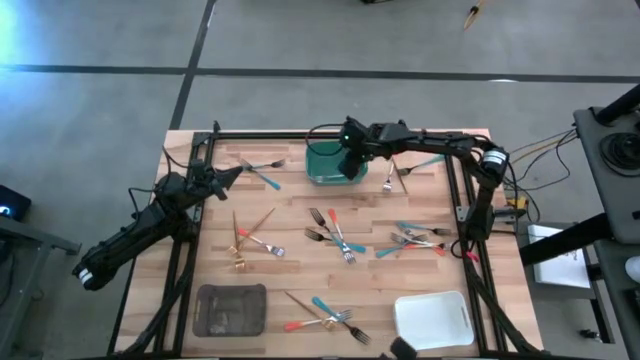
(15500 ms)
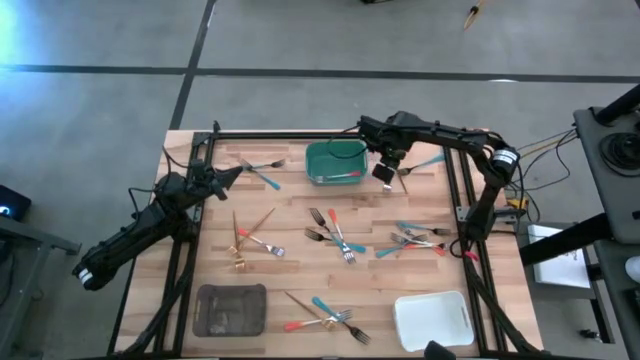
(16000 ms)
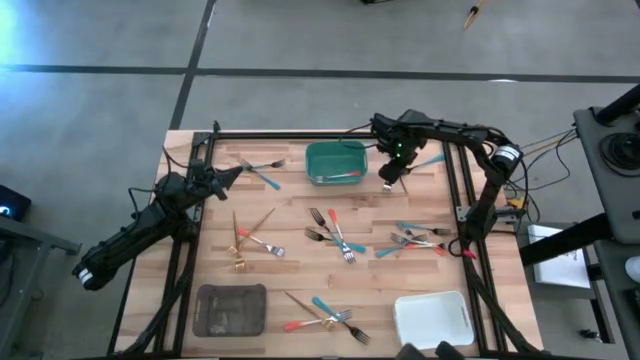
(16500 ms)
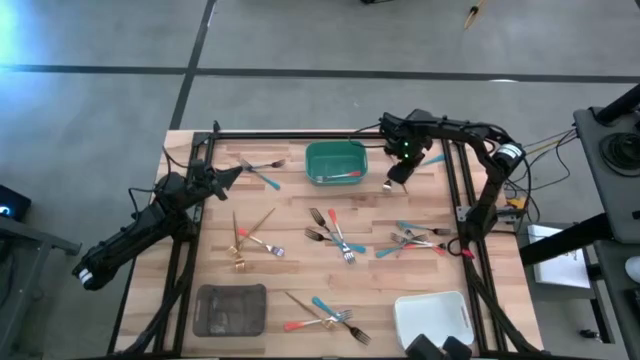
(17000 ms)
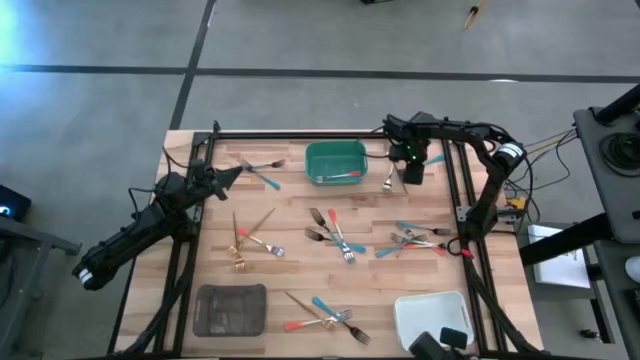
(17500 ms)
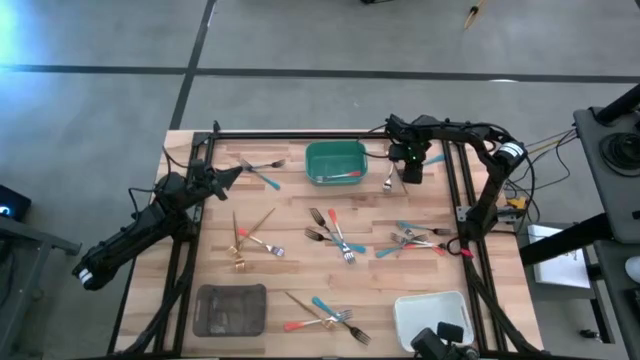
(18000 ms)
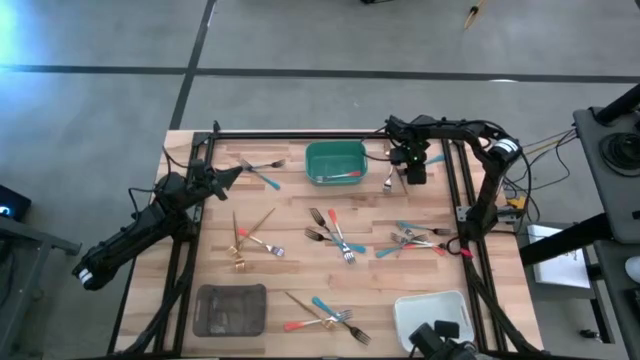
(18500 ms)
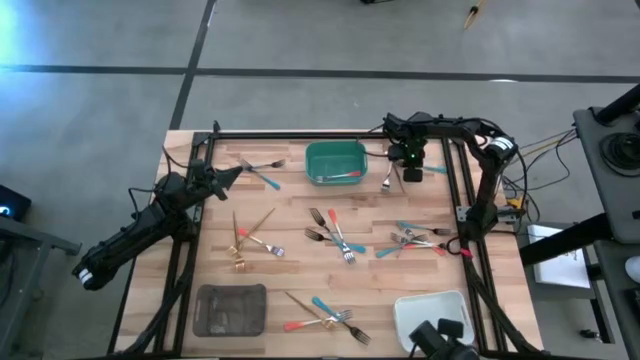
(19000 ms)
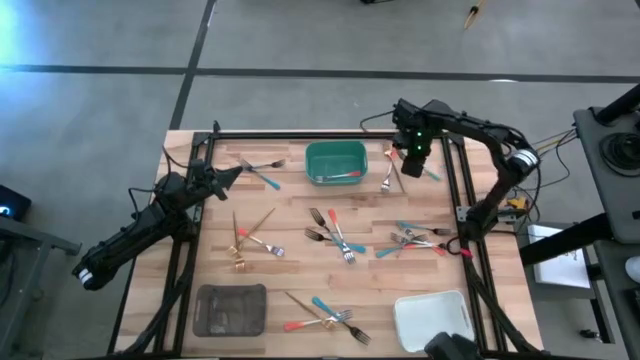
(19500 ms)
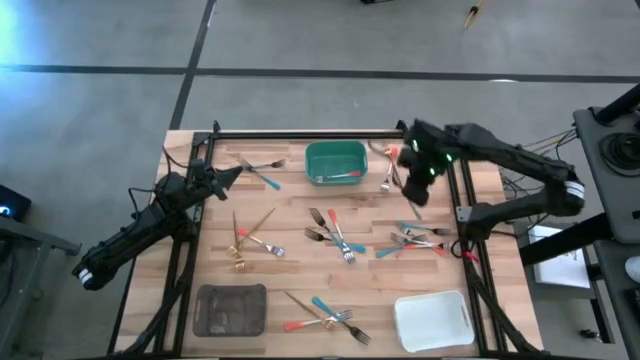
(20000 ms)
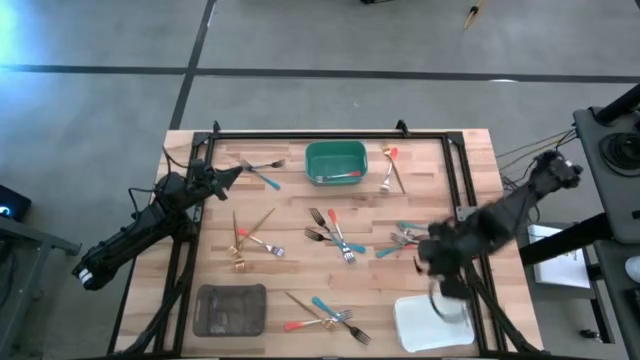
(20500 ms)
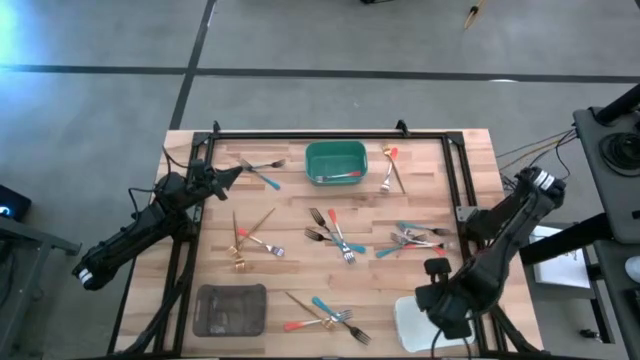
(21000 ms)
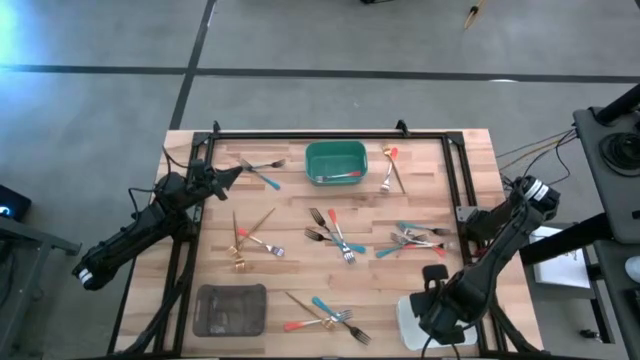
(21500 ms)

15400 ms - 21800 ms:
Task: Sort silverware by color (type)
Put the blue fork into the white bin

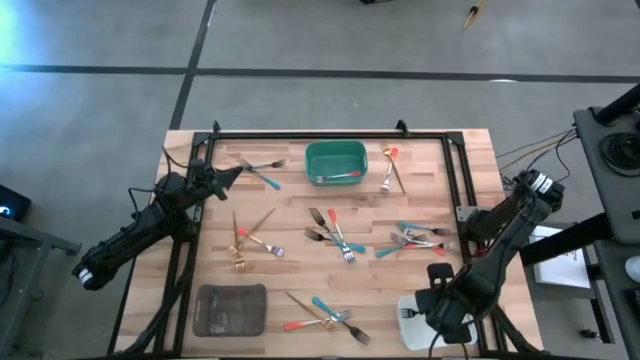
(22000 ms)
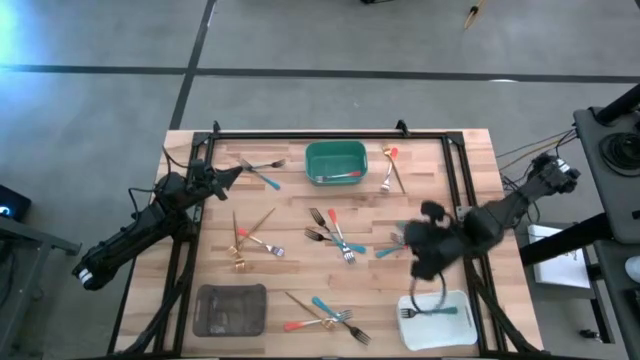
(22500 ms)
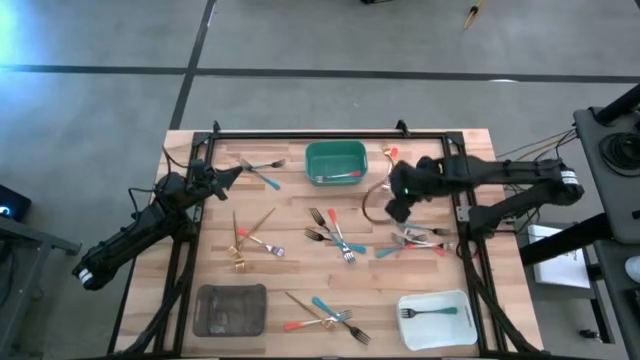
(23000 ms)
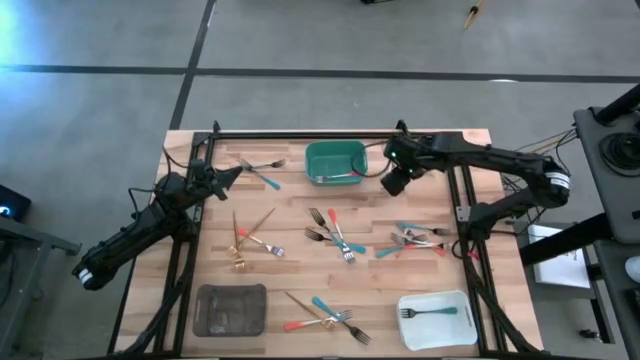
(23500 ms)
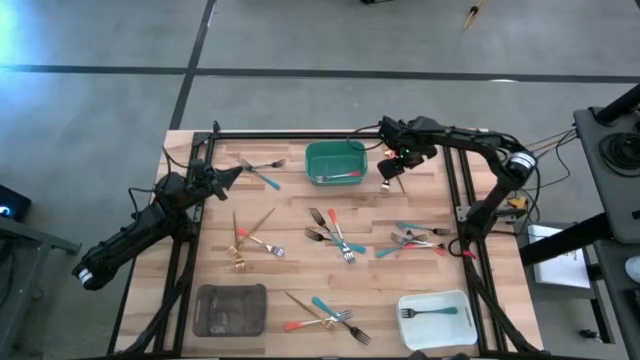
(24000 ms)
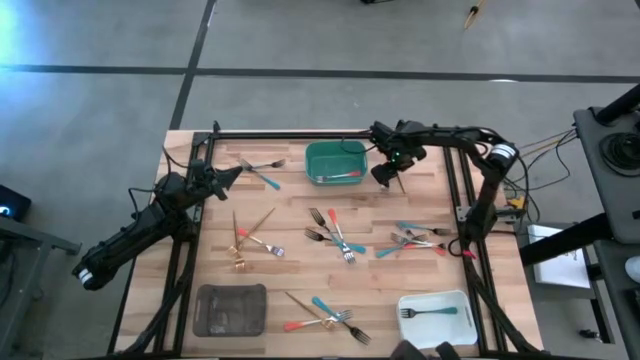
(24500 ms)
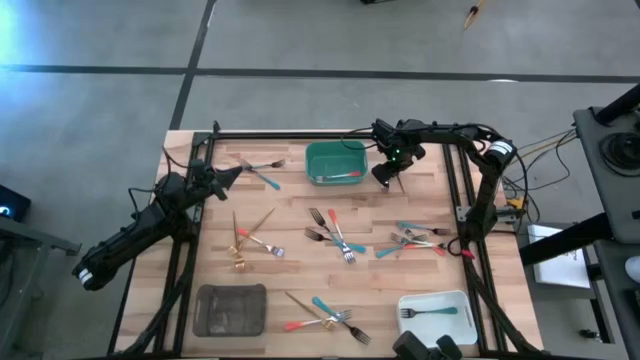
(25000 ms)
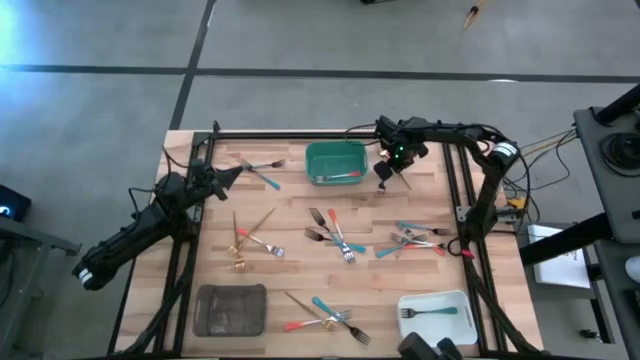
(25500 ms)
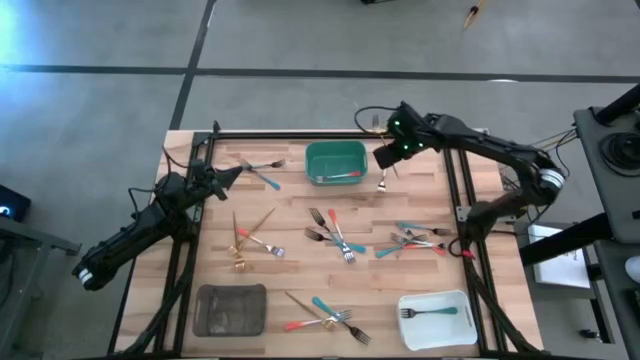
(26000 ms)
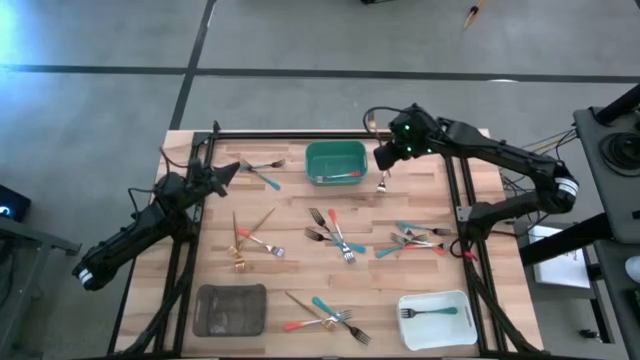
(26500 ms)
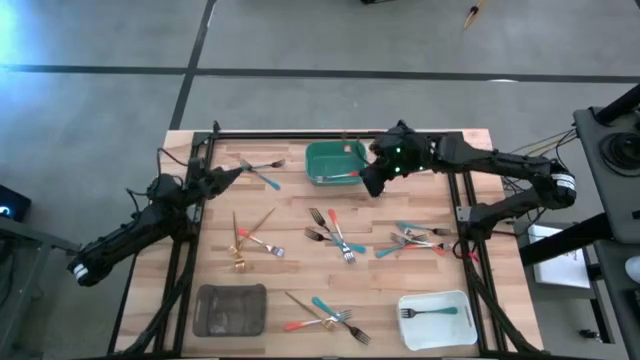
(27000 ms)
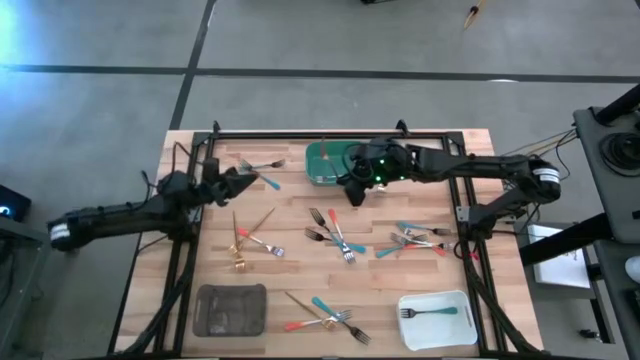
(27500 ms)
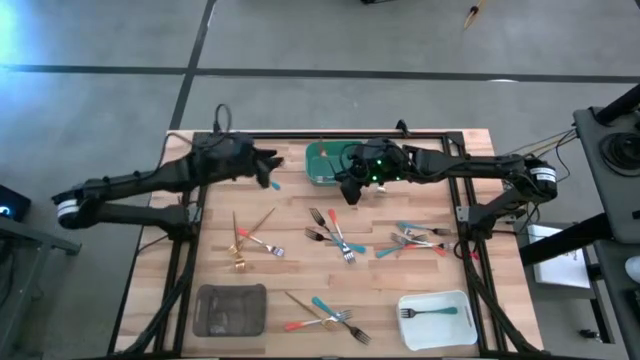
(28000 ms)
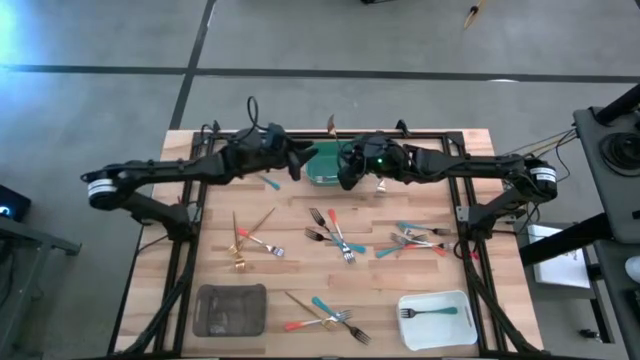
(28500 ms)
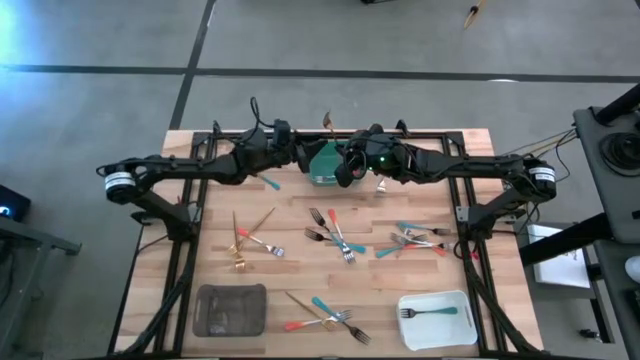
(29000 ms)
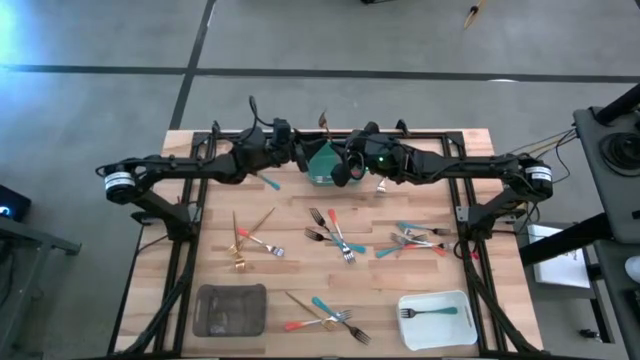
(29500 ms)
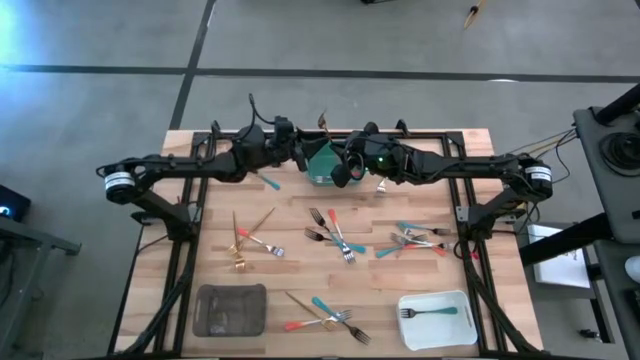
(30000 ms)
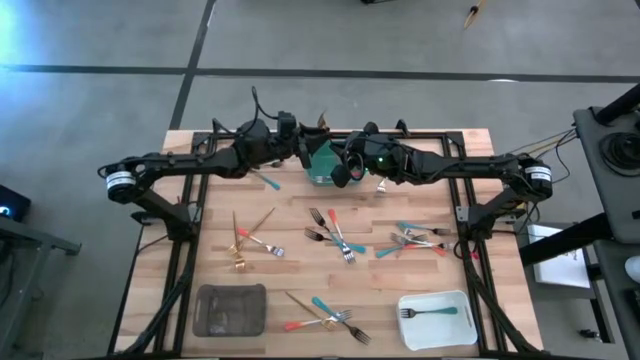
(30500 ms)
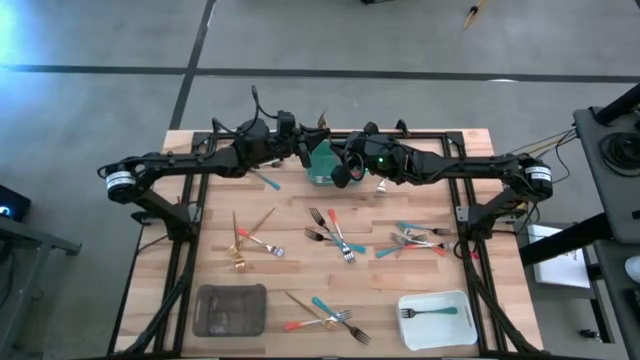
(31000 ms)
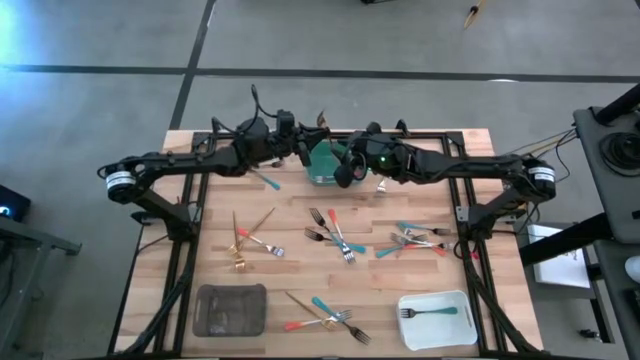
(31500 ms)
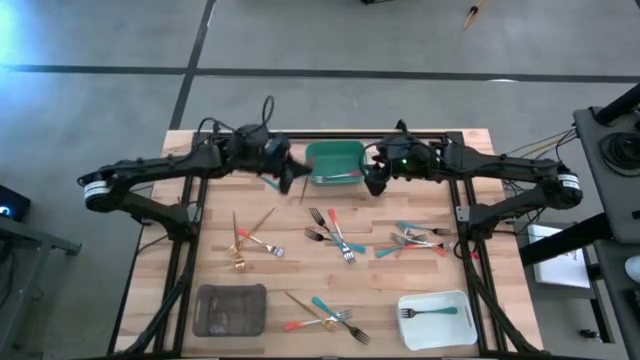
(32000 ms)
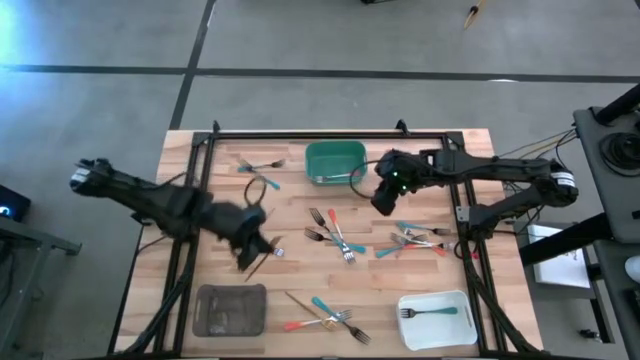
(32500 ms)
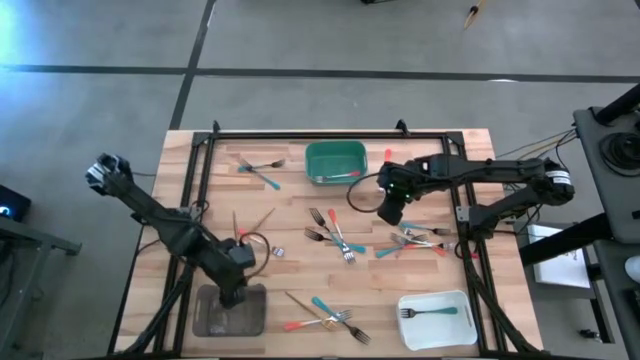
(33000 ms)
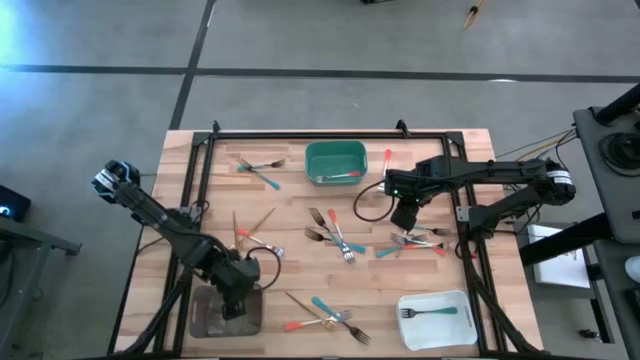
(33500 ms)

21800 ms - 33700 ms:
Put the gold fork into the black bin

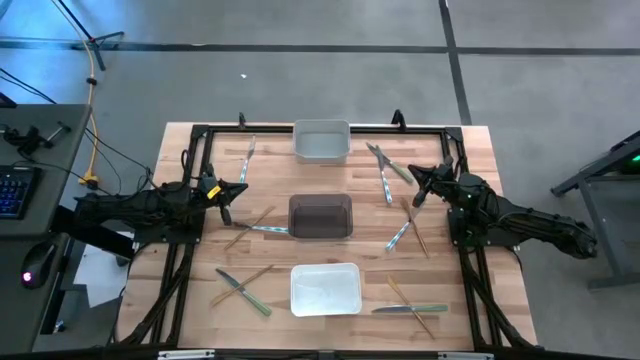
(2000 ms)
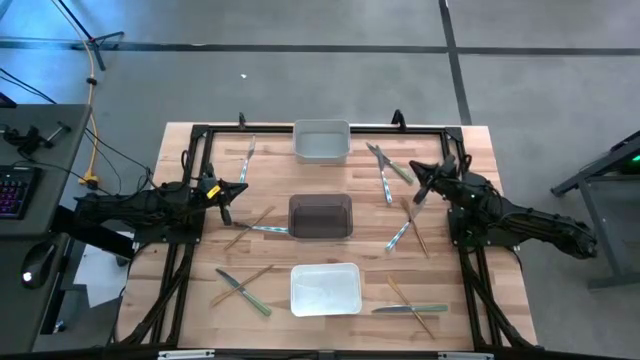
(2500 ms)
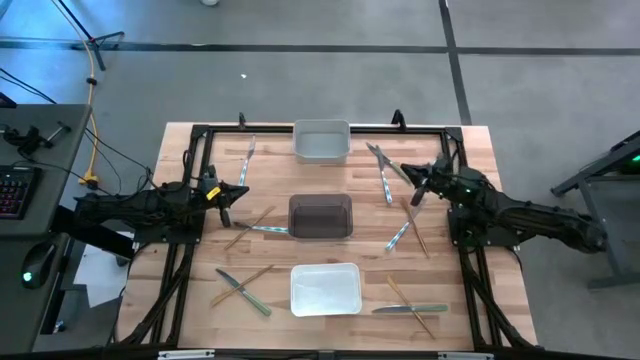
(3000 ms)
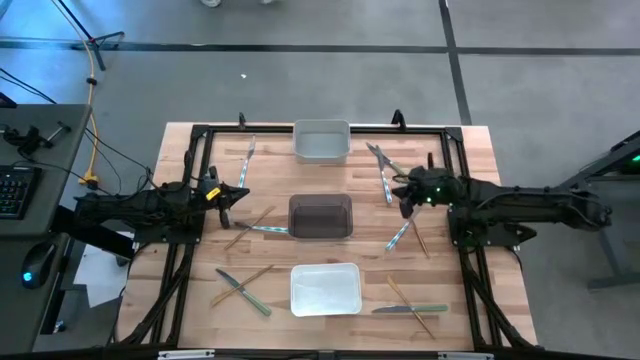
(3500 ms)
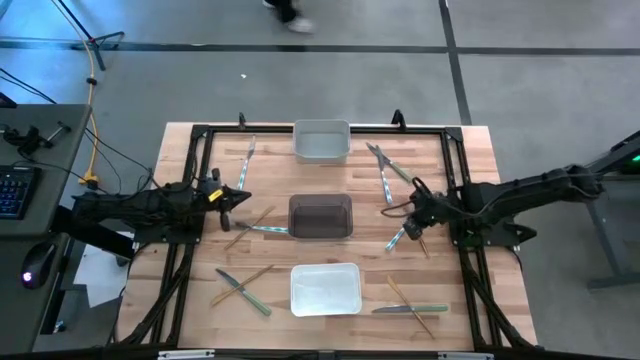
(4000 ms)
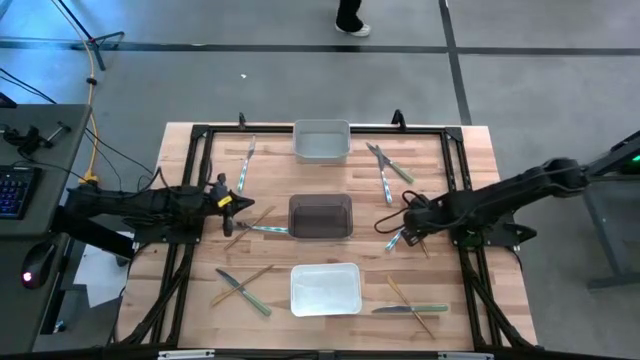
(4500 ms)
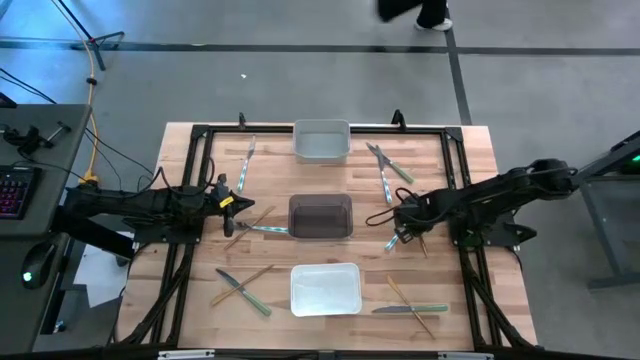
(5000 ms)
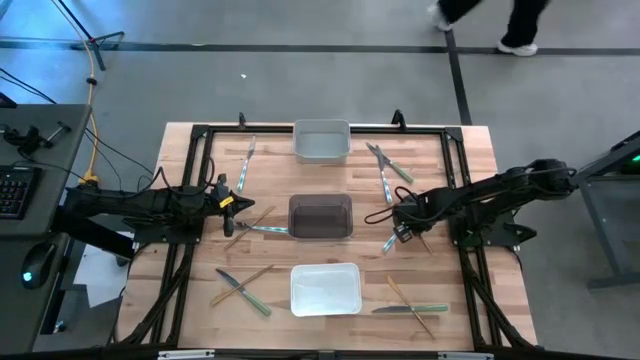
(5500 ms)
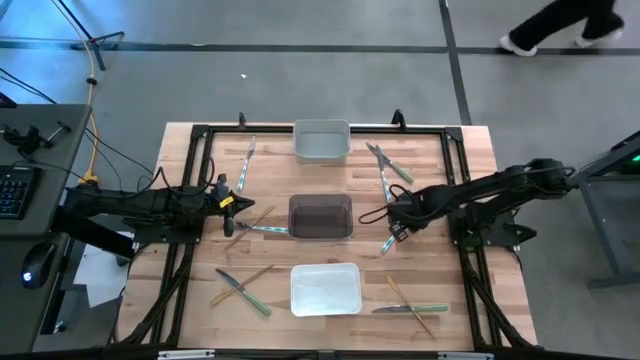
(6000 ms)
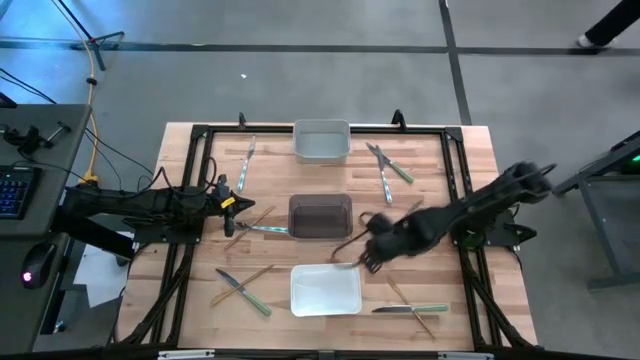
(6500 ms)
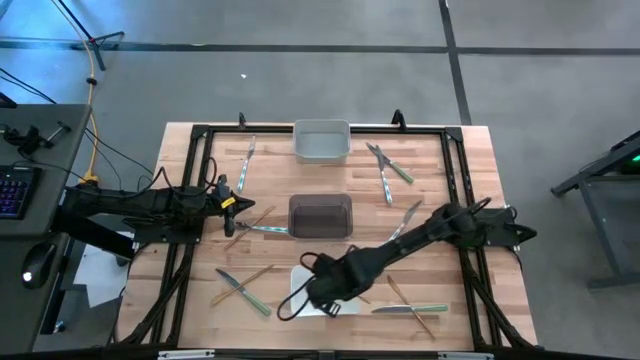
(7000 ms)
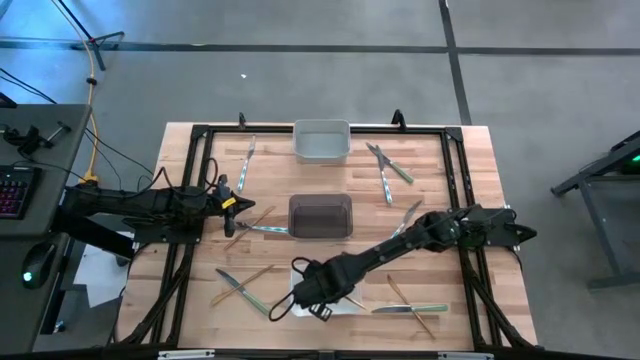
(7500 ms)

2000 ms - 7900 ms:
Task: Sort silverware by color (type)
Put the gold table knife into the white bin
